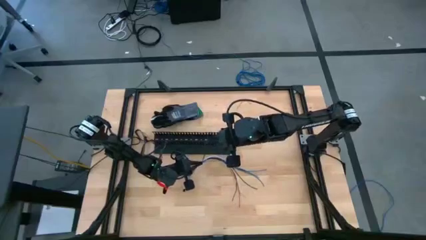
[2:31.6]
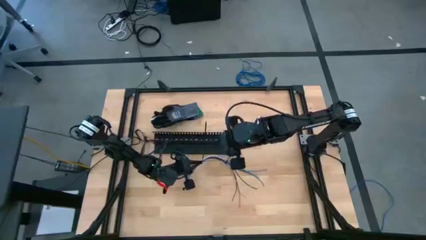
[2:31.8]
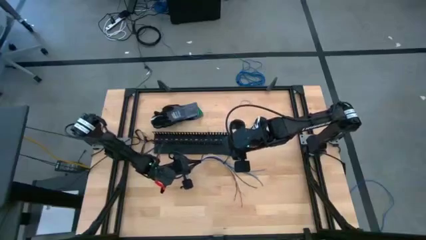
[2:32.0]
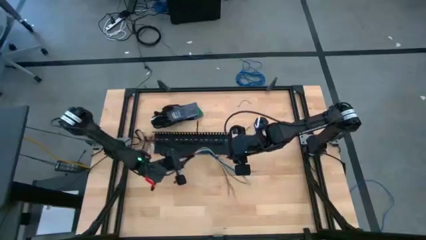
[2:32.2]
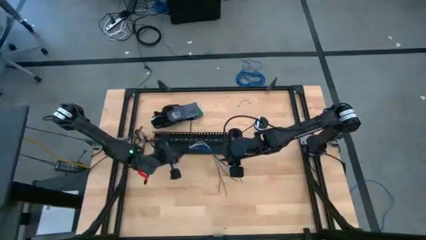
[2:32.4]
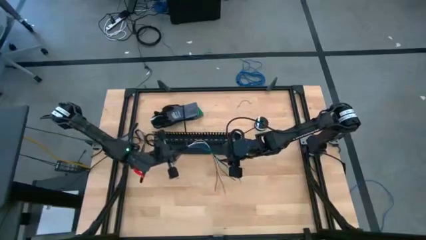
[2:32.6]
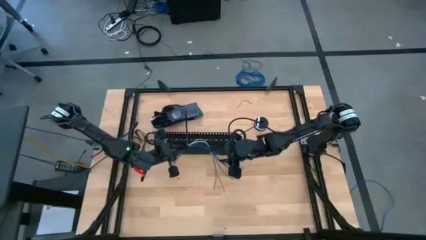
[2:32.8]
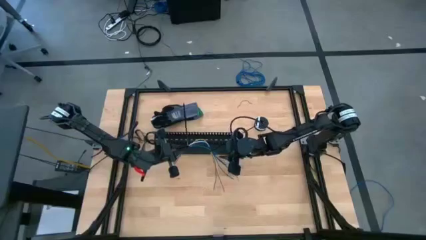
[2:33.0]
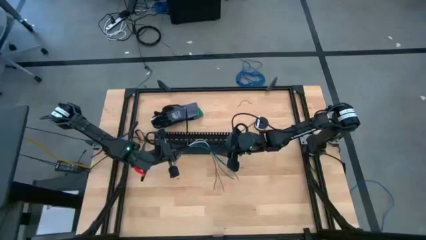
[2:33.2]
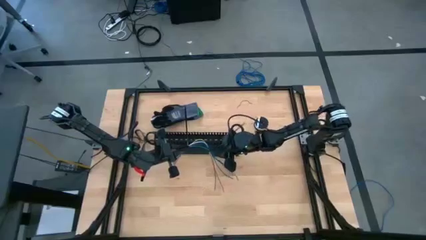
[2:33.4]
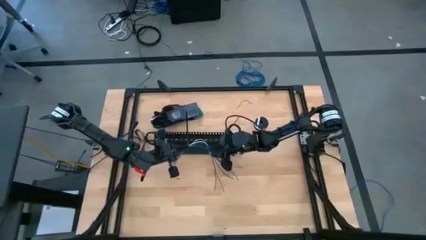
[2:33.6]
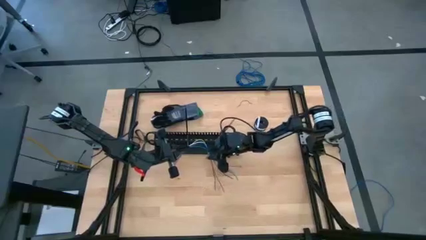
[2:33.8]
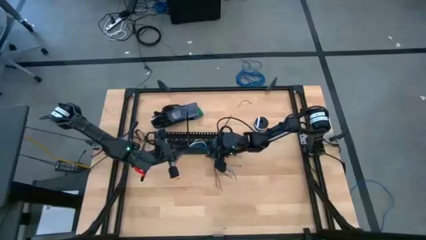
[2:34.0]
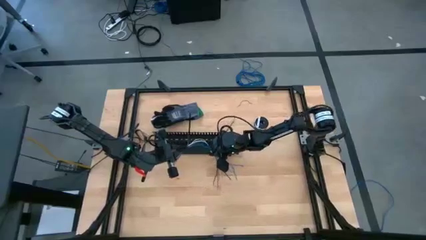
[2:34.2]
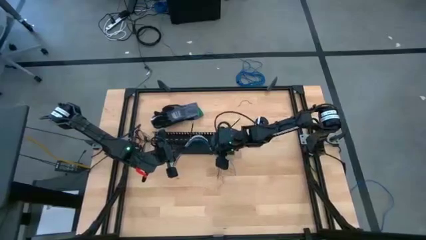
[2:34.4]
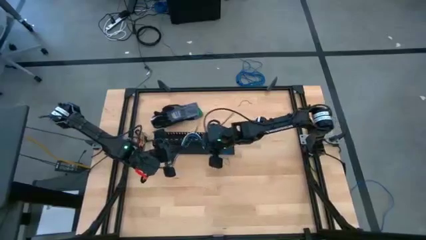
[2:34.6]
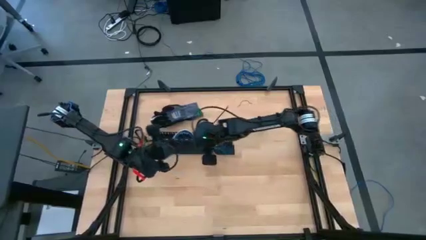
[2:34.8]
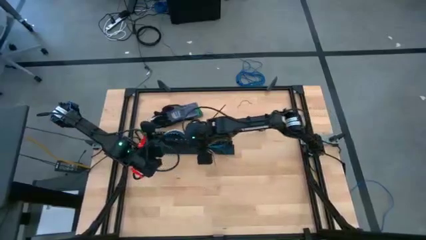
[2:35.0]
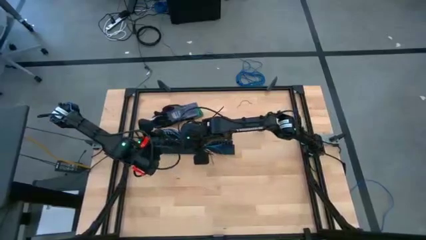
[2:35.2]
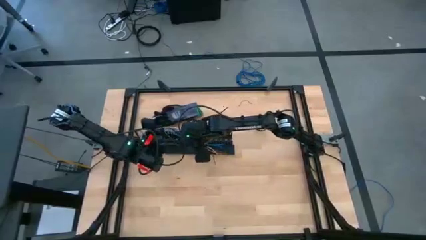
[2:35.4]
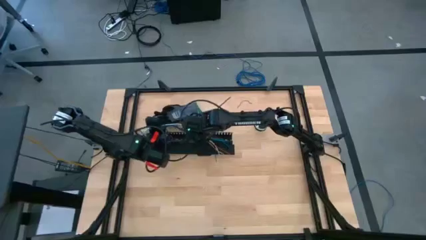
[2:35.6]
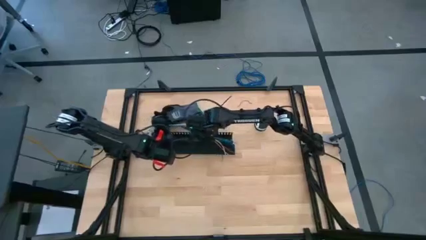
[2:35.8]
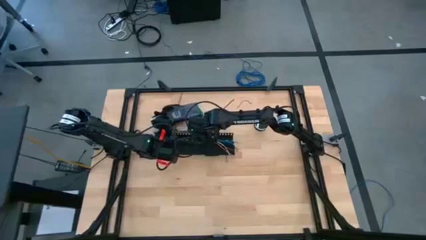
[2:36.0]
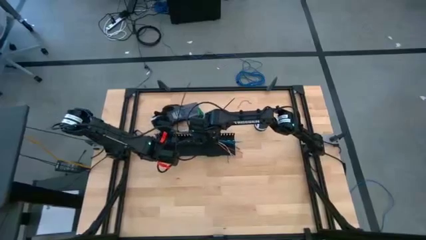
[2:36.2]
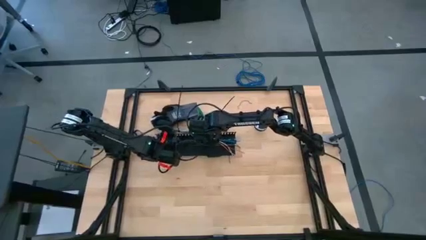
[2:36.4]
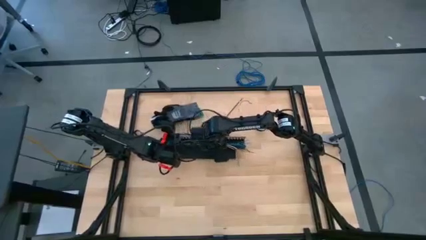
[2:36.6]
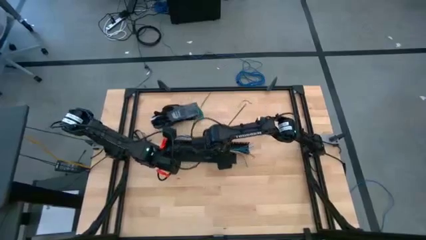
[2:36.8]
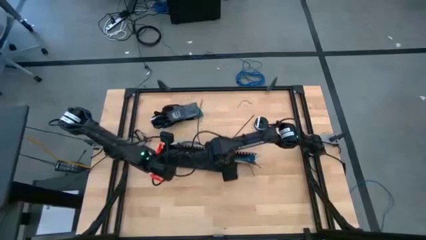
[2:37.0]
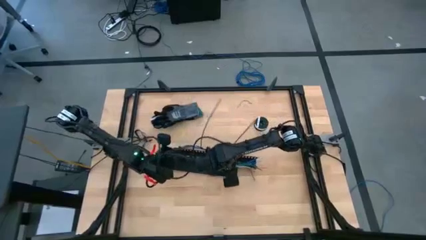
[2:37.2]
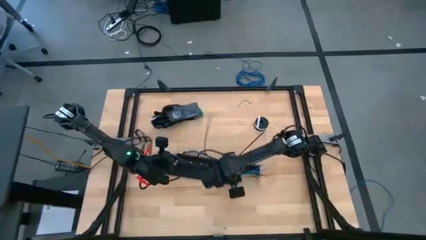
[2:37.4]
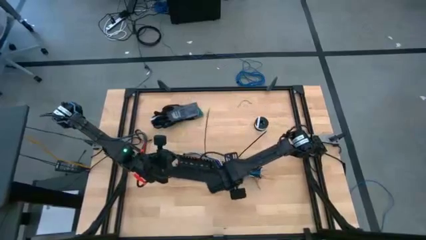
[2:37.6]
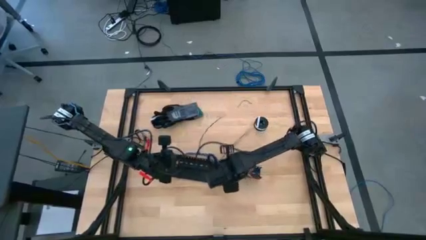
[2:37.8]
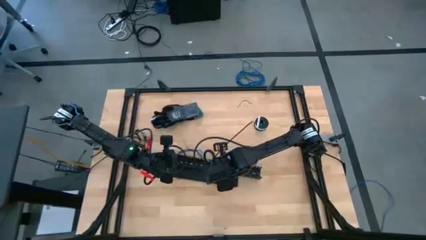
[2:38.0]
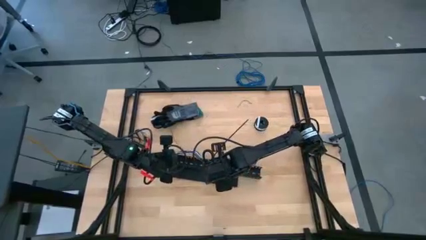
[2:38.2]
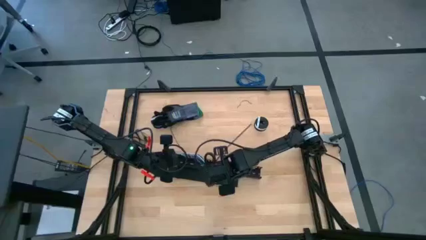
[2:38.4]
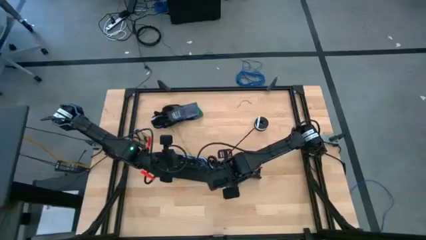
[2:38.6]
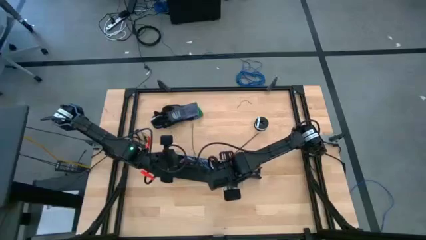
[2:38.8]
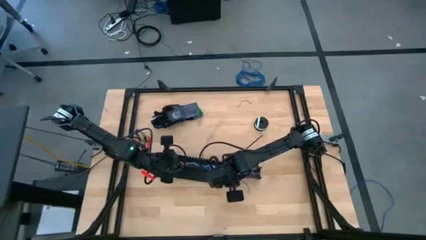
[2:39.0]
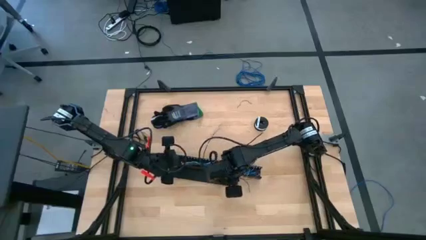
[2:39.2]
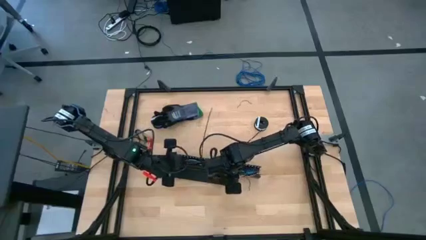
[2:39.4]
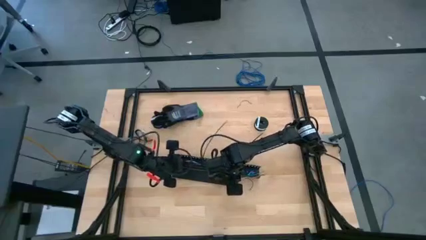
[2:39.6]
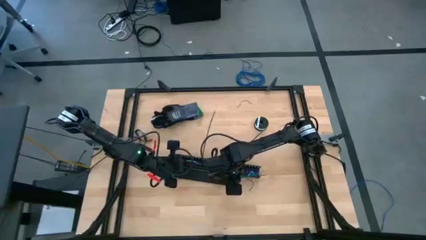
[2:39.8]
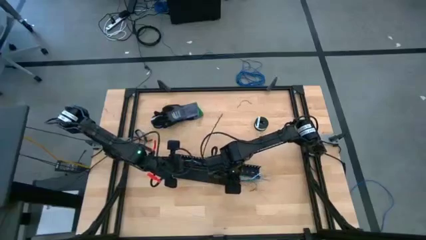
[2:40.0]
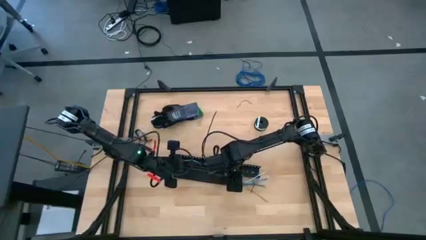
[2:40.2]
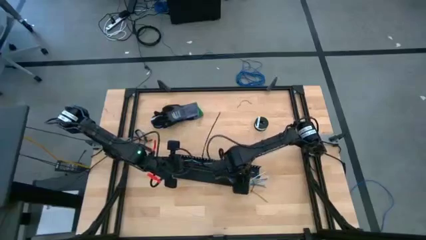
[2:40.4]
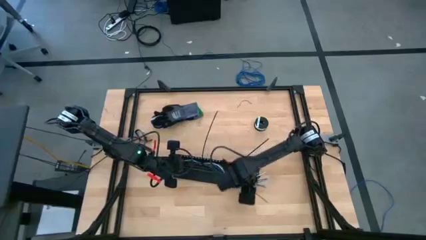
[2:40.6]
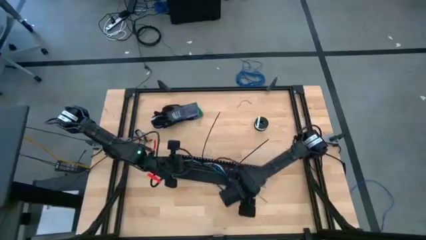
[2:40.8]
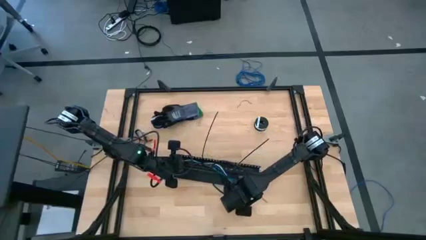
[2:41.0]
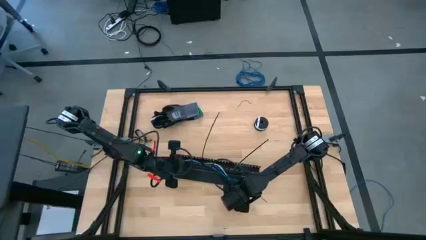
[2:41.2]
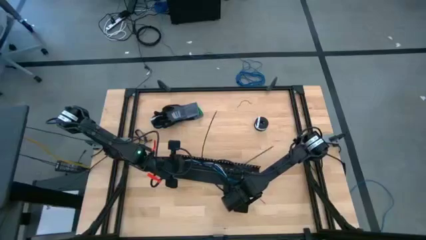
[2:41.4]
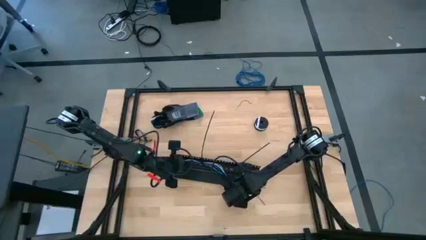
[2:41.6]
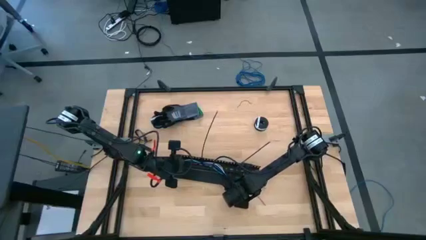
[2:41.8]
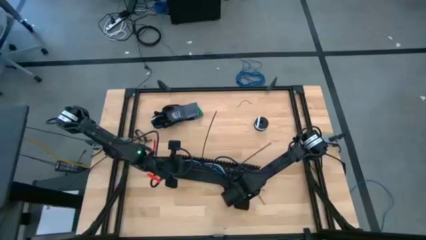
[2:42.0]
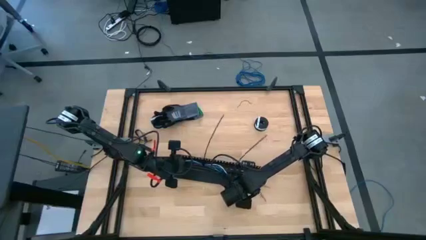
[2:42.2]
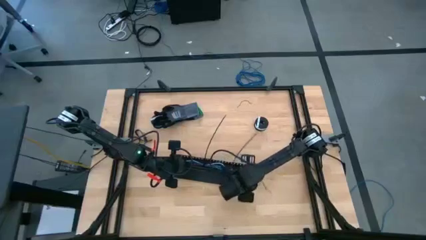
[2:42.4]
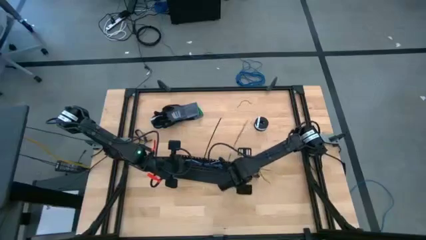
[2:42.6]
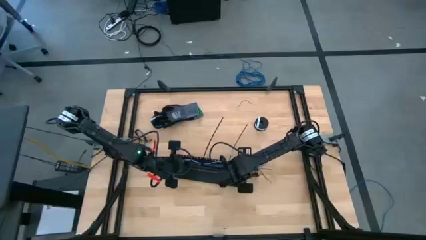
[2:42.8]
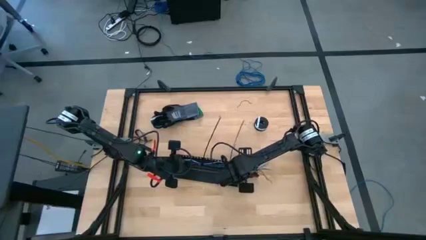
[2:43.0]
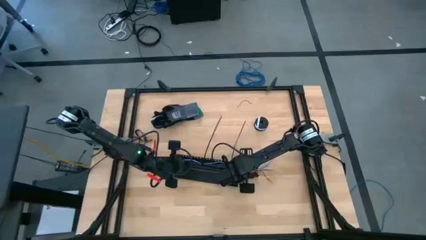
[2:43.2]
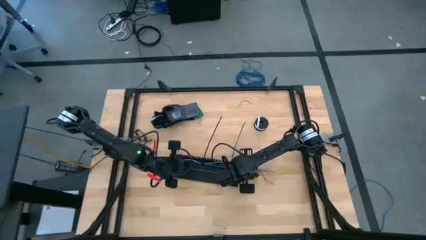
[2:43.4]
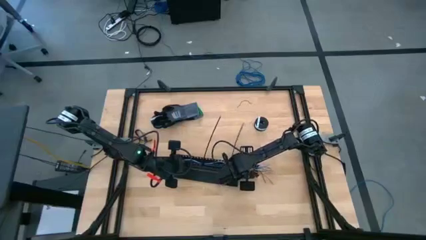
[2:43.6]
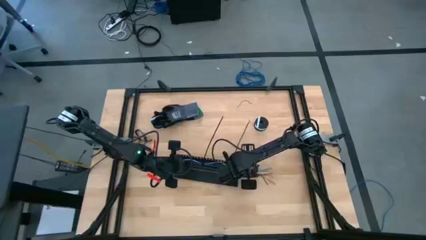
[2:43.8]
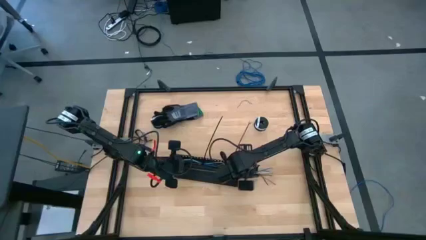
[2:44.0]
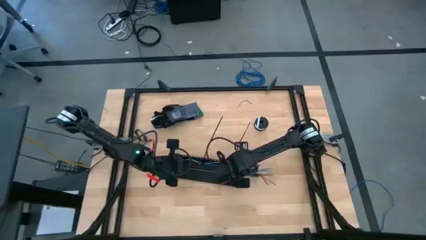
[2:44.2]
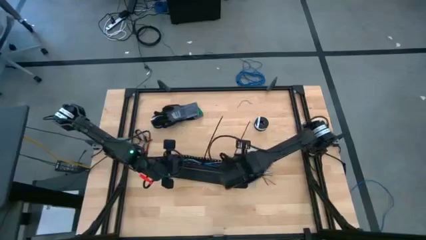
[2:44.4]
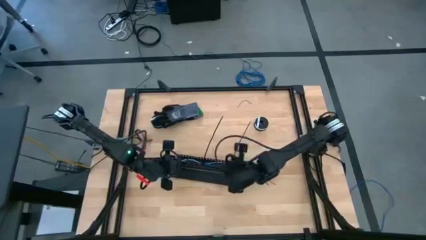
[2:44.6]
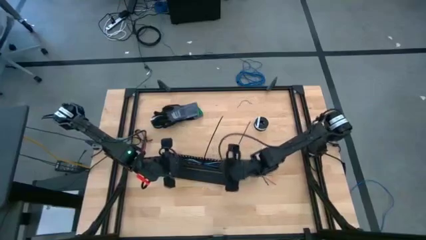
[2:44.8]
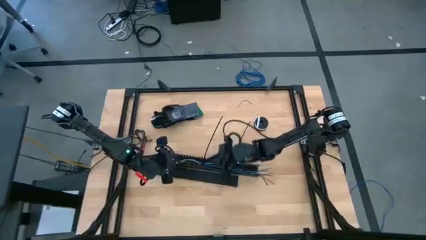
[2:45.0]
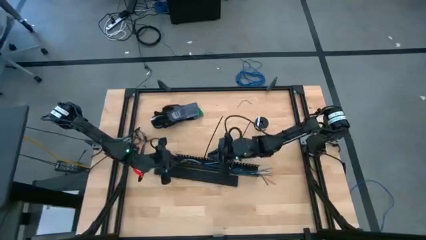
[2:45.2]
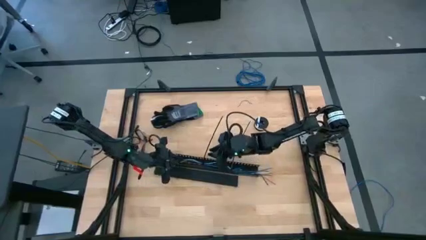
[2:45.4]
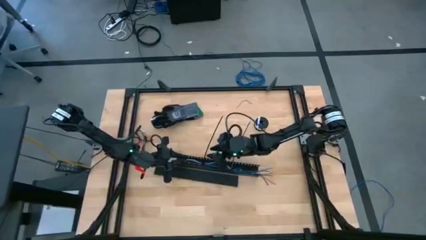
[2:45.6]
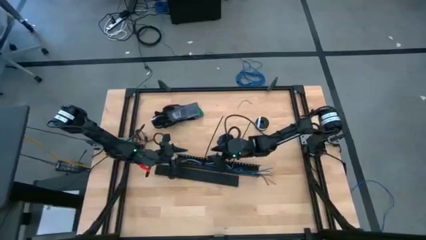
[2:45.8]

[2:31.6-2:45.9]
Task: Ziptie cables
Put the zip tied cables into the black cable duct

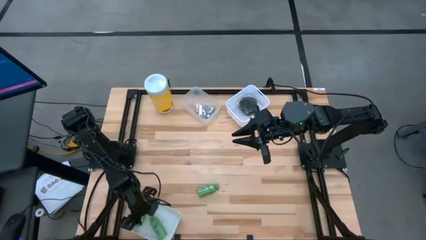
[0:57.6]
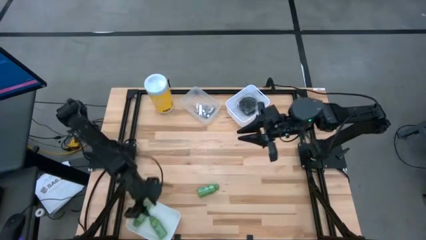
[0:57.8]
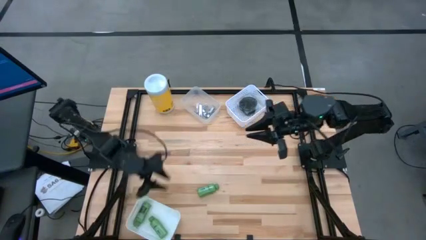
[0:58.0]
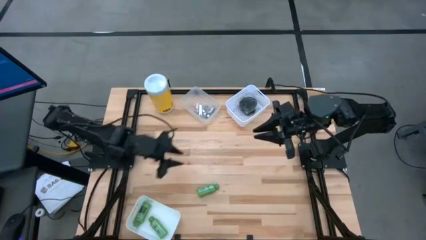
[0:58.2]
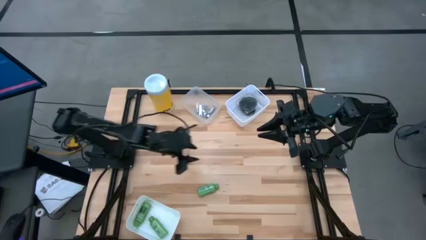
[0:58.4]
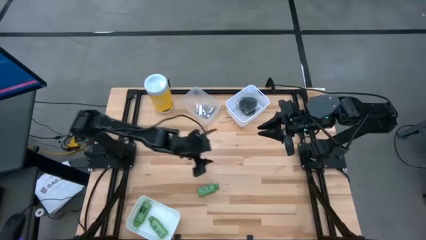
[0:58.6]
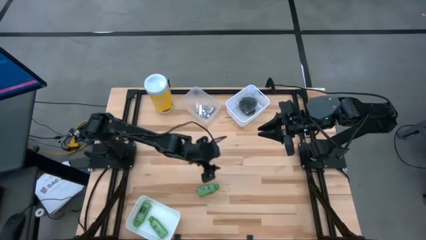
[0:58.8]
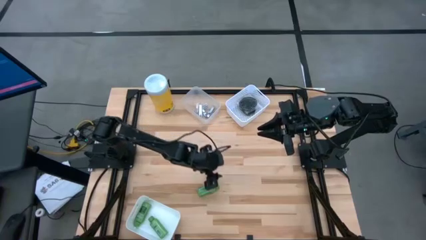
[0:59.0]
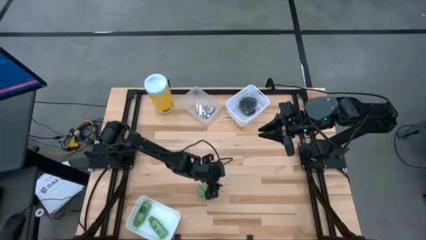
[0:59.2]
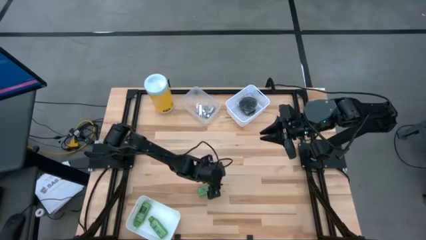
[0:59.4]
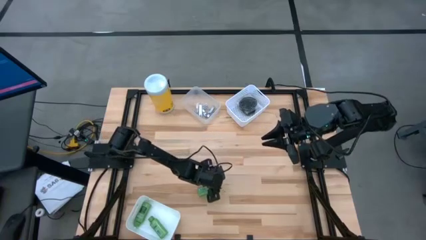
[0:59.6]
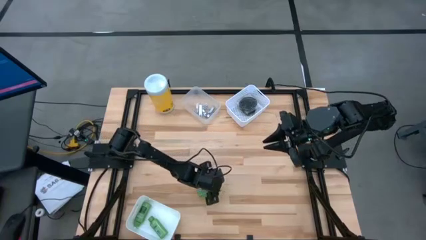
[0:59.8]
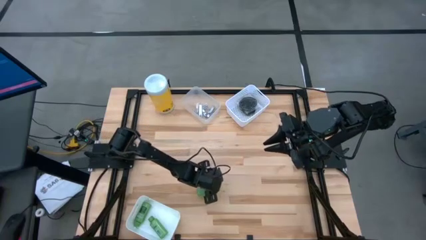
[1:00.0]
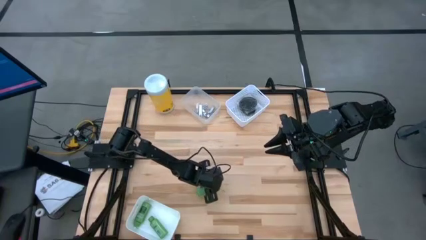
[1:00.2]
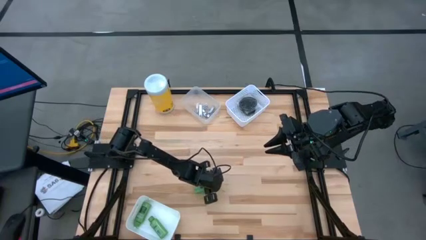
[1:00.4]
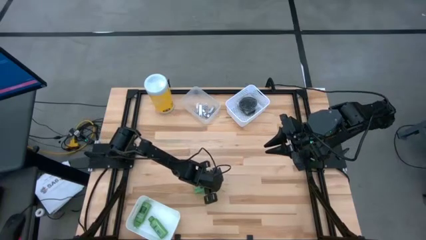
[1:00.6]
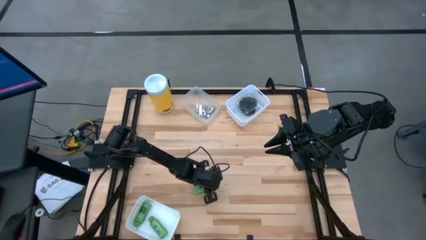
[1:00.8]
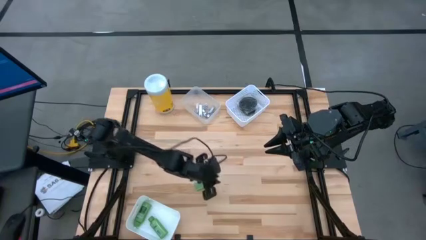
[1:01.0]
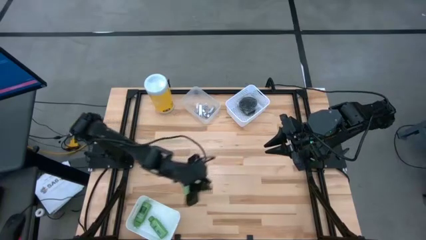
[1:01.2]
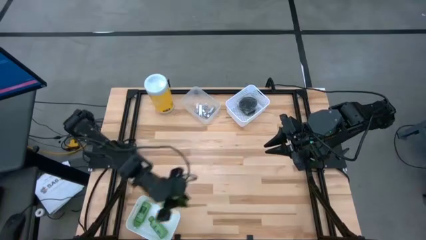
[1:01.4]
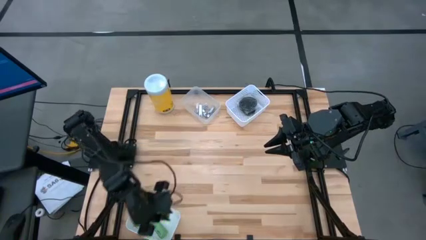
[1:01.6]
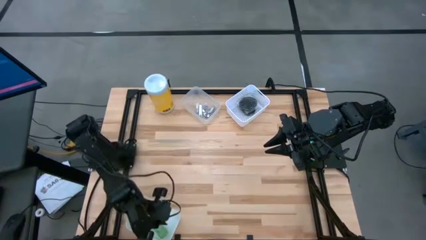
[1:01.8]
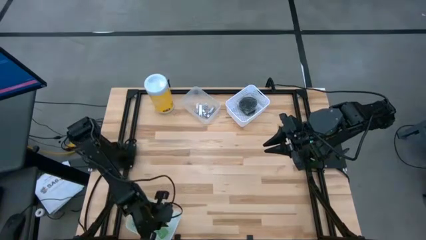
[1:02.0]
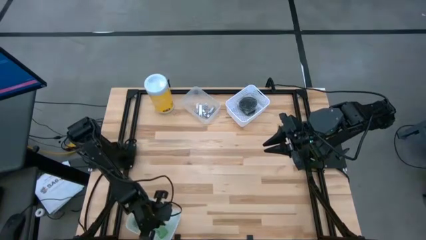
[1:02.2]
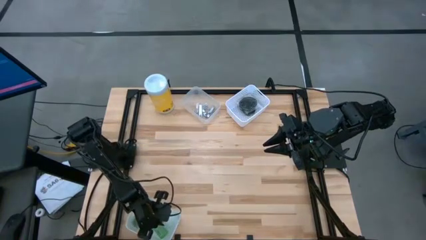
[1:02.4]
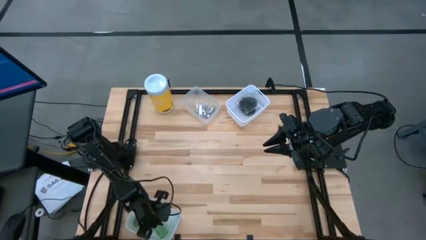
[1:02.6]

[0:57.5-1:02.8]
Task: Pick & Place Travel size toiletries
Put the green shampoo into the bottom white bin
